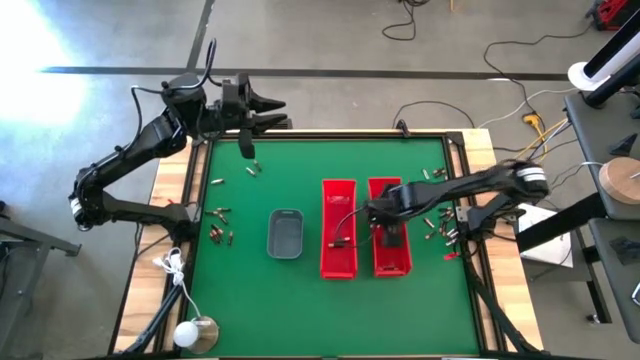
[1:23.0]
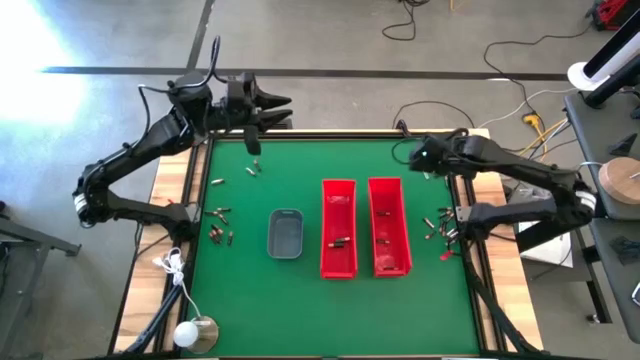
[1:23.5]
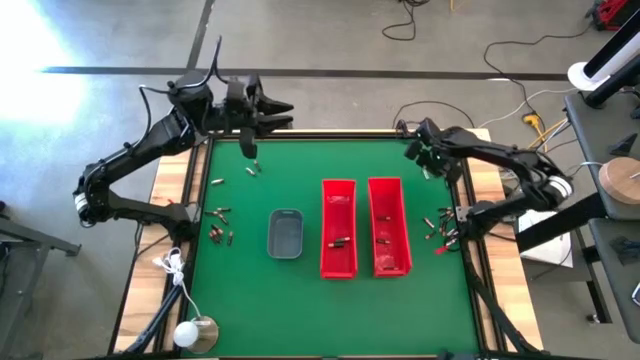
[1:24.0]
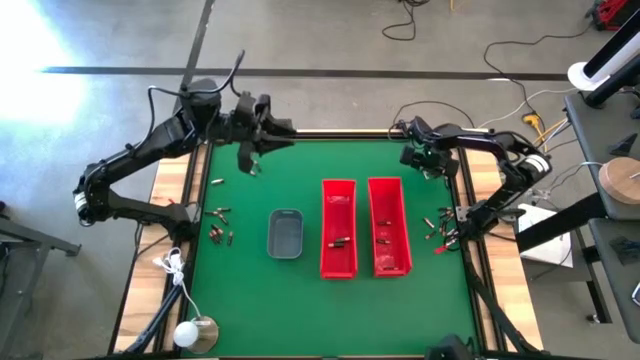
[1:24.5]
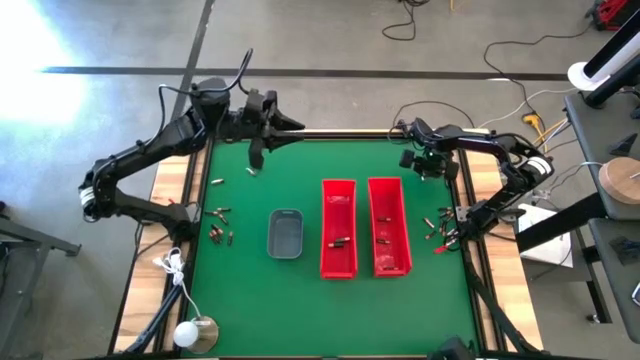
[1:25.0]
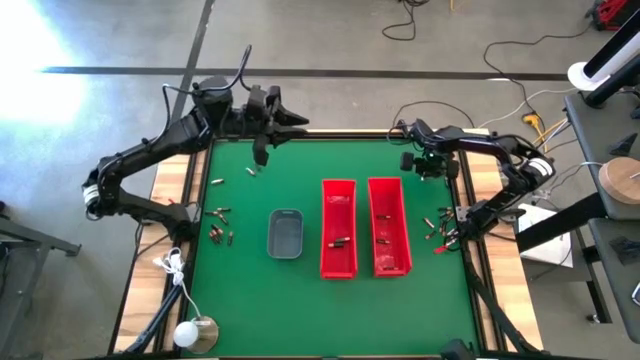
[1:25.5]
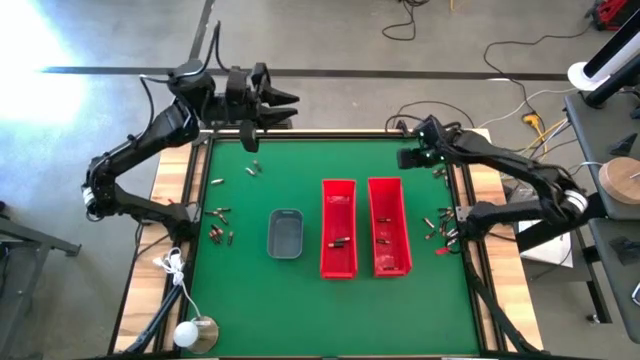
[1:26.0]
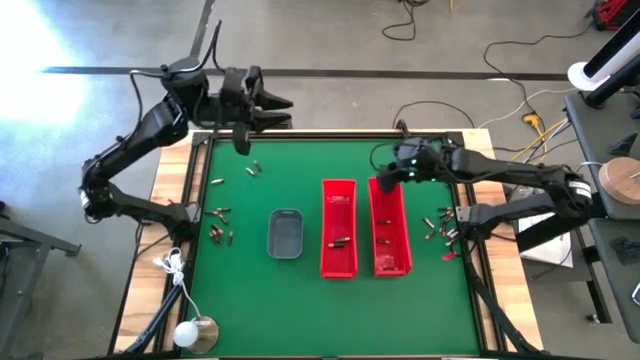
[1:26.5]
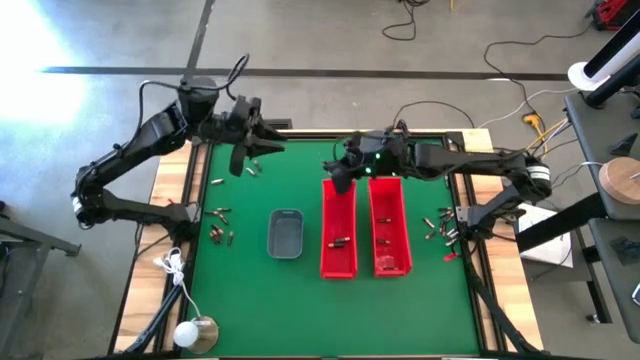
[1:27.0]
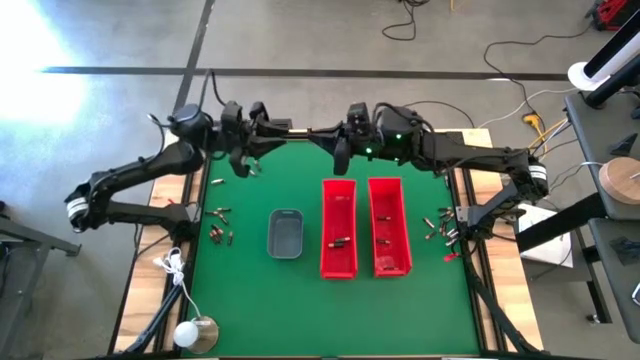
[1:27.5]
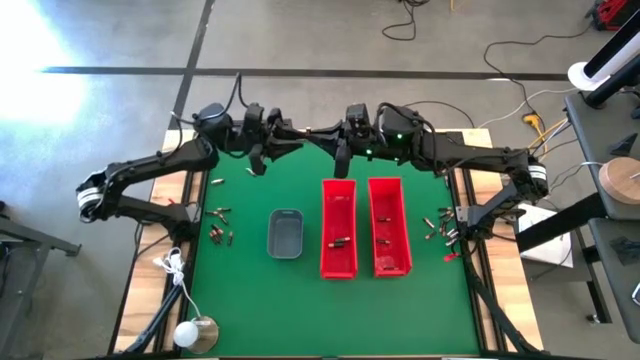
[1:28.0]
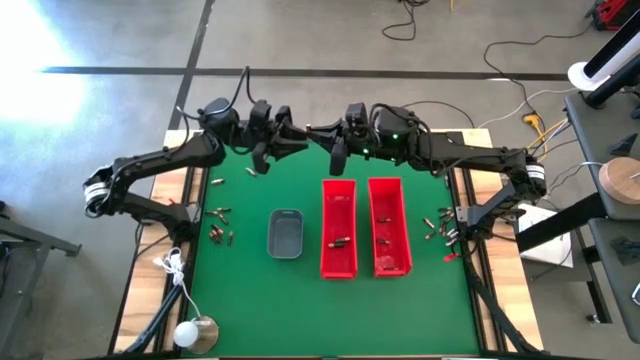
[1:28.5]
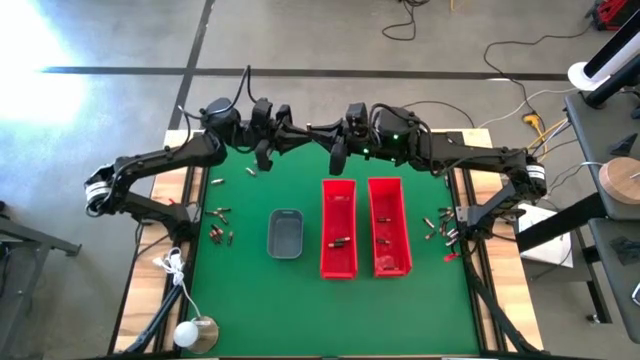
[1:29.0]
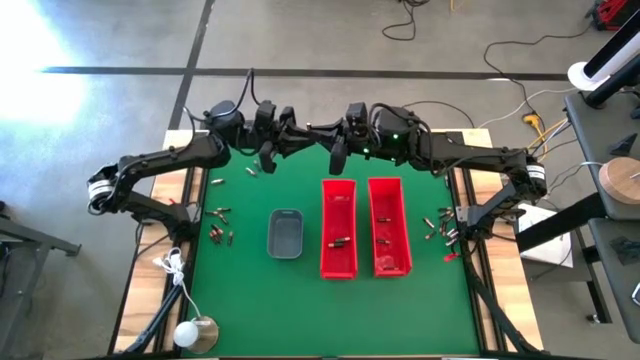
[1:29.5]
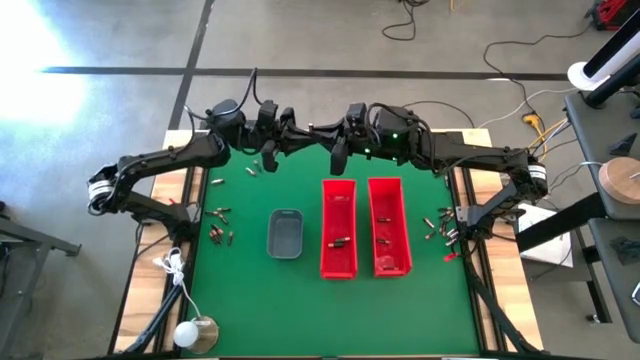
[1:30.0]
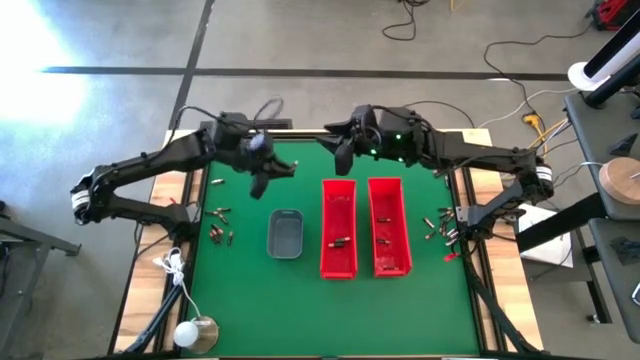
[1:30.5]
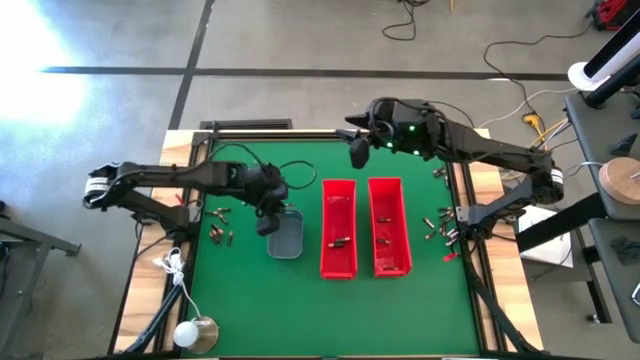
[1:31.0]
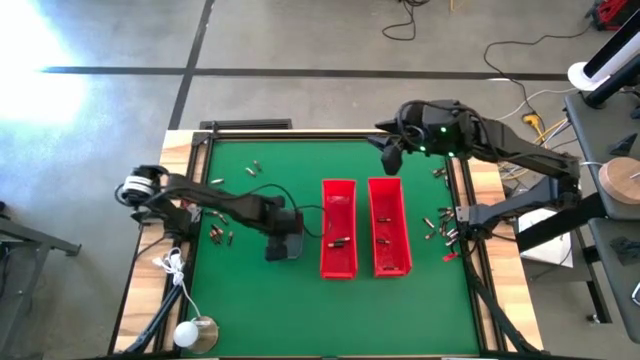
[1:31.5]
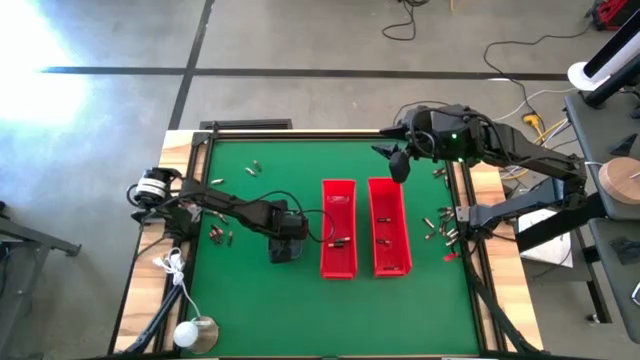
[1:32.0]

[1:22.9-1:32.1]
Task: Sort batteries
Put the silver battery into the gray bin

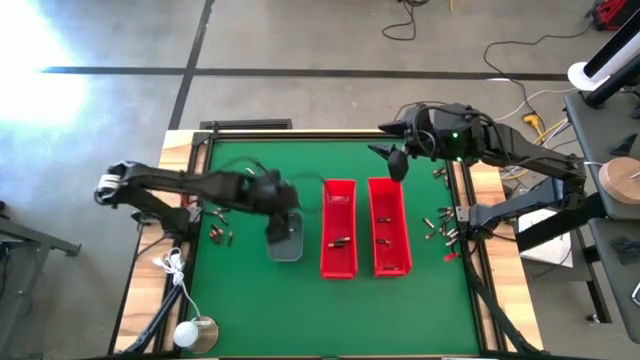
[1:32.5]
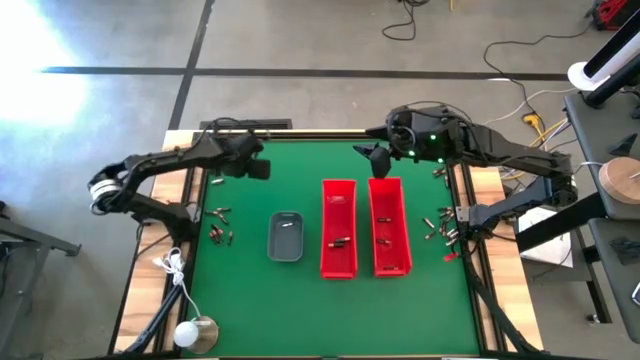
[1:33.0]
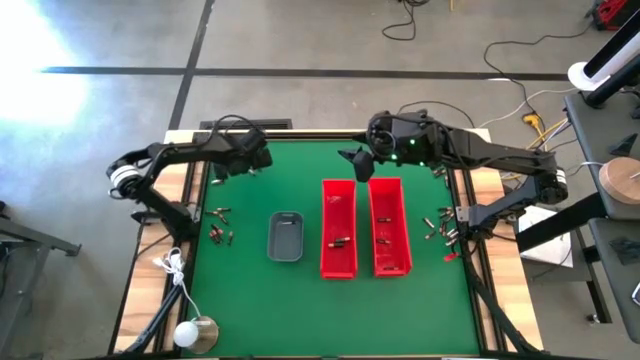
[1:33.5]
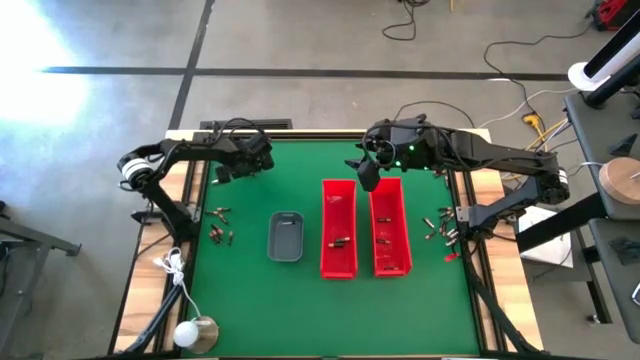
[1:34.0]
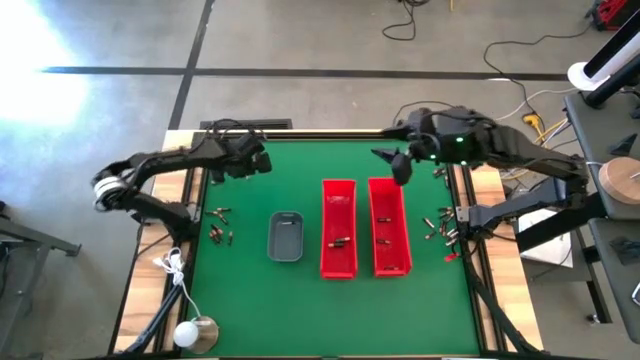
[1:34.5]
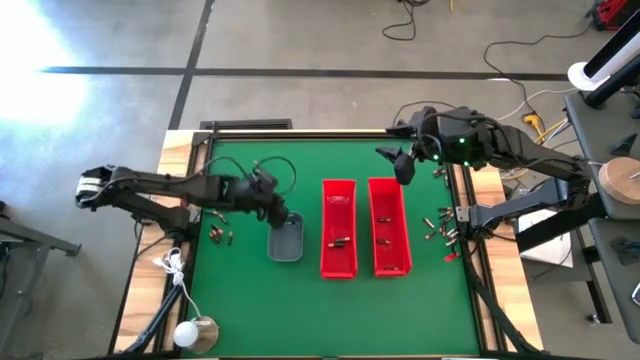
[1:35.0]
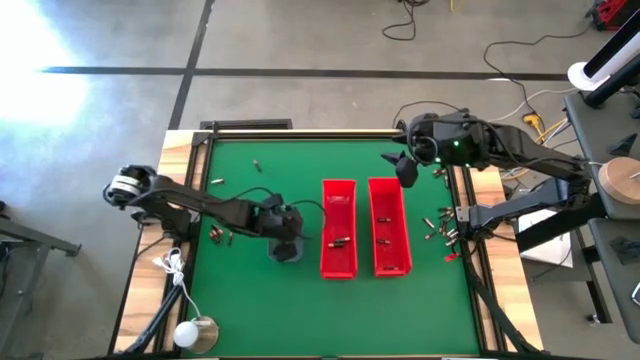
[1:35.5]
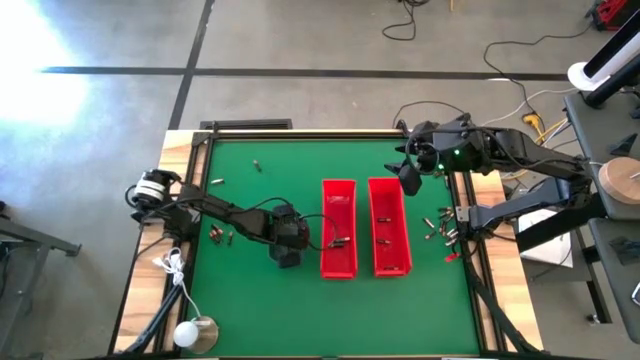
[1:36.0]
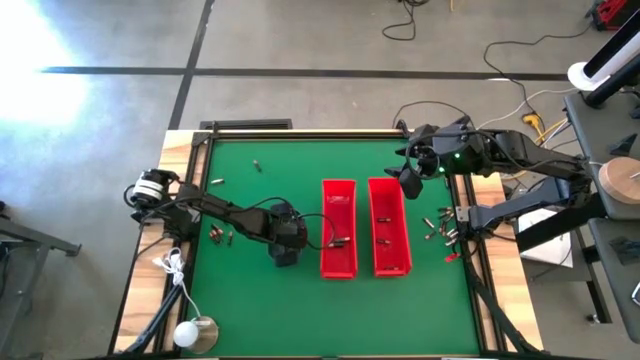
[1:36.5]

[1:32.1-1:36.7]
Put the silver battery into the gray bin

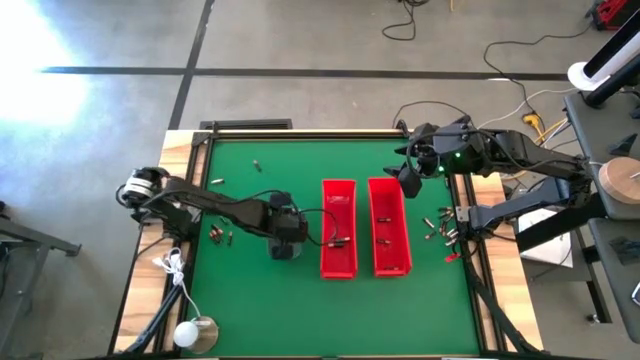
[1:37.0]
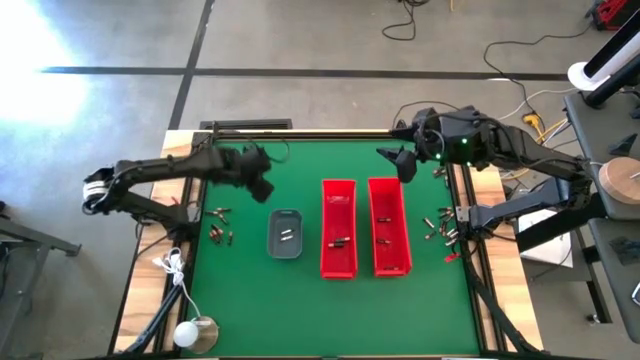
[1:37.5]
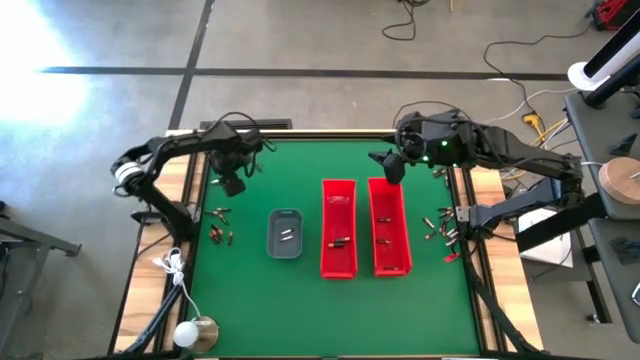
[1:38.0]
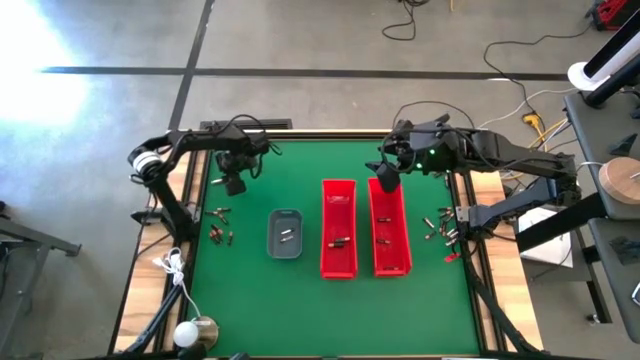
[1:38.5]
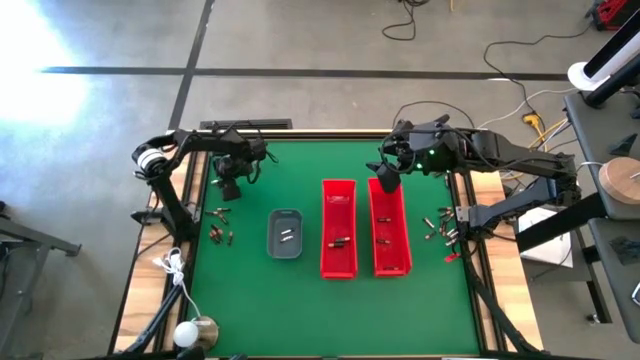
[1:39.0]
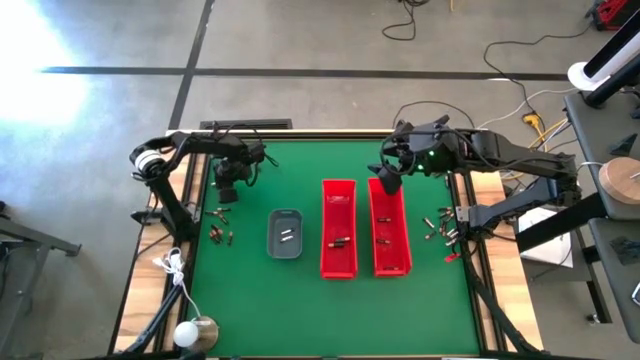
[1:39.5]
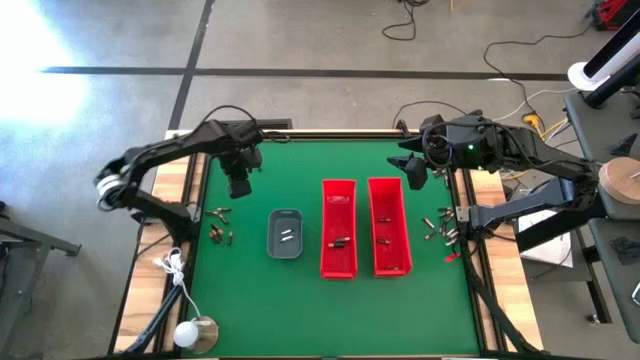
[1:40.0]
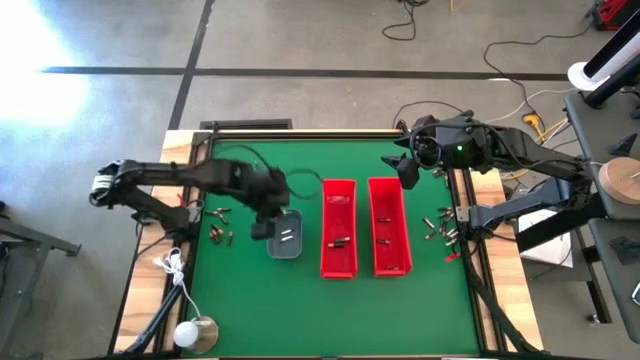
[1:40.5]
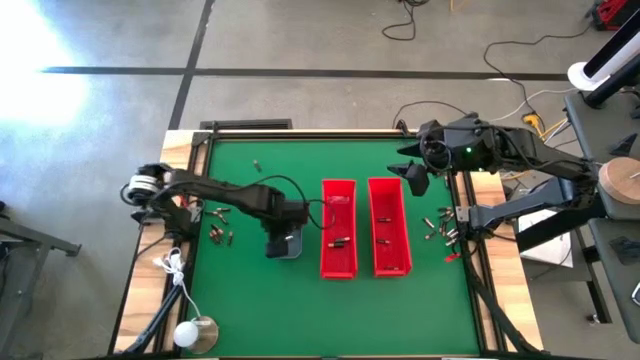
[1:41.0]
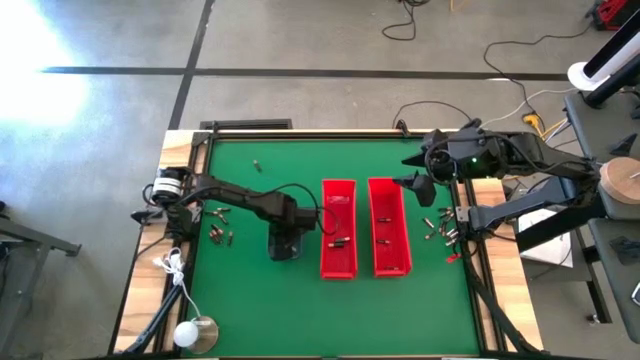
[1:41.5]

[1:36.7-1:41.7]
Put the silver battery into the gray bin

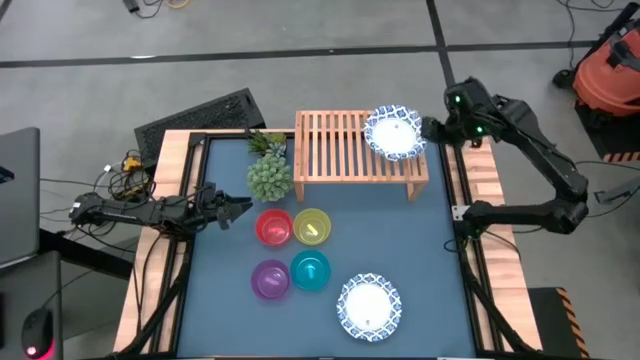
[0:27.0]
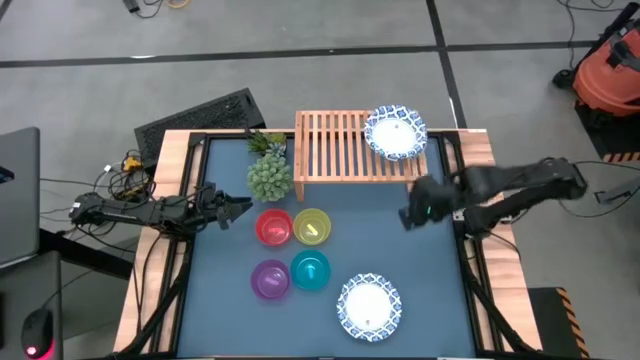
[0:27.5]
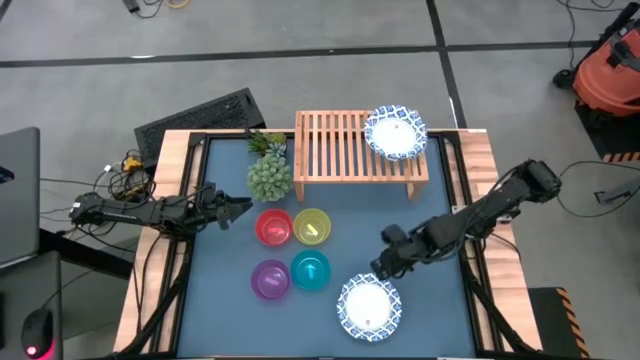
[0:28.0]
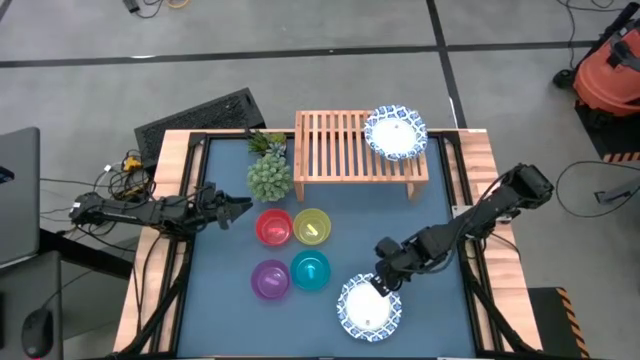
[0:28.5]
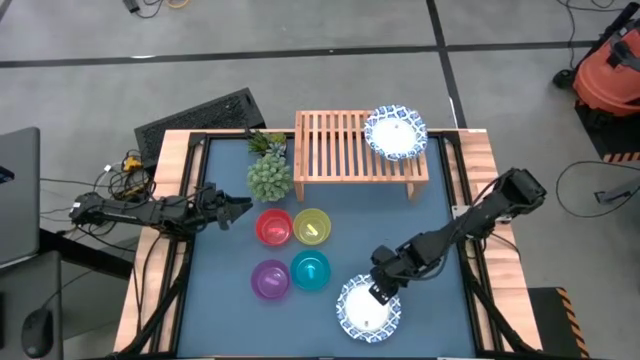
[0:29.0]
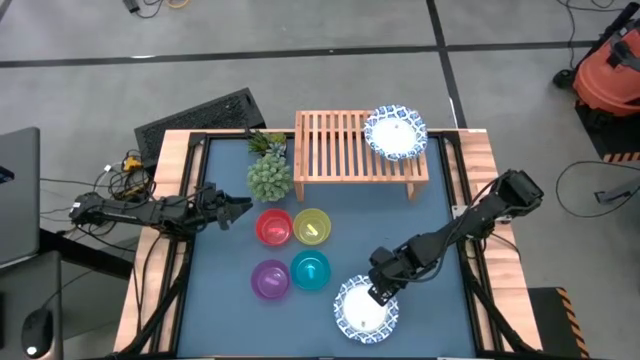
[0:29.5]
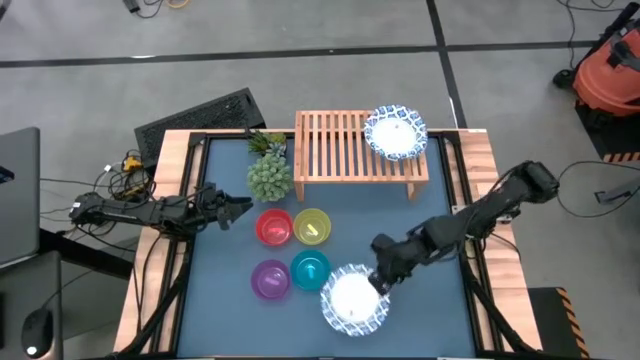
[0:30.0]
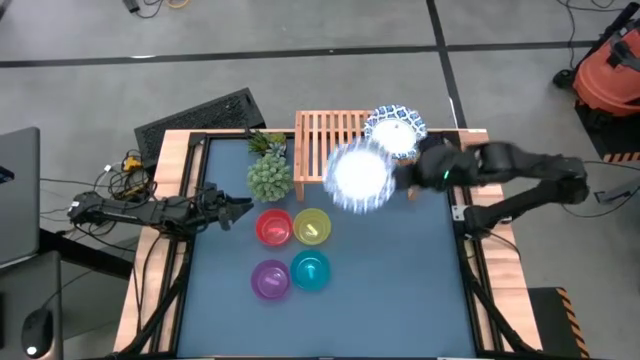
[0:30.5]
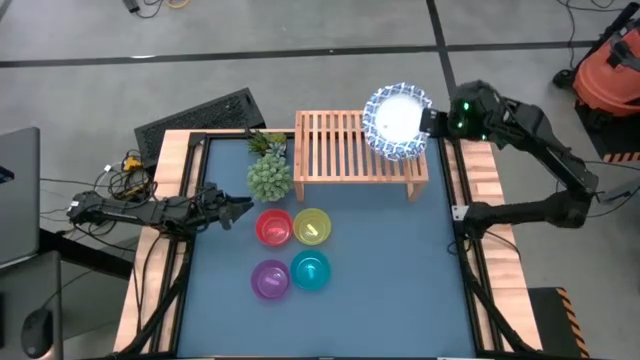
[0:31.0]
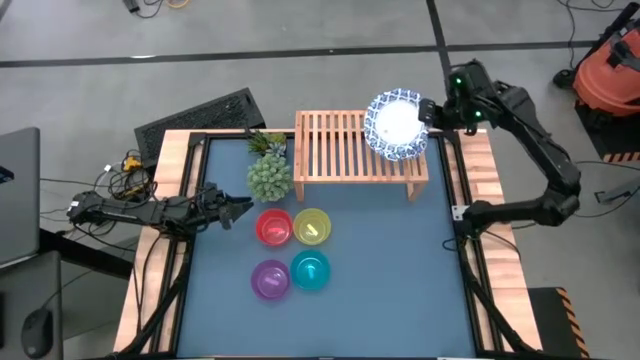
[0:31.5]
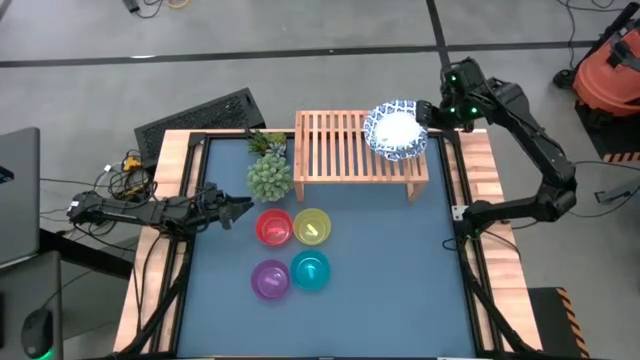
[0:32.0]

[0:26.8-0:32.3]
Task: Place and stack bowls onto a shelf
Stack the white patterned bowl on top of the white patterned bowl on the shelf
